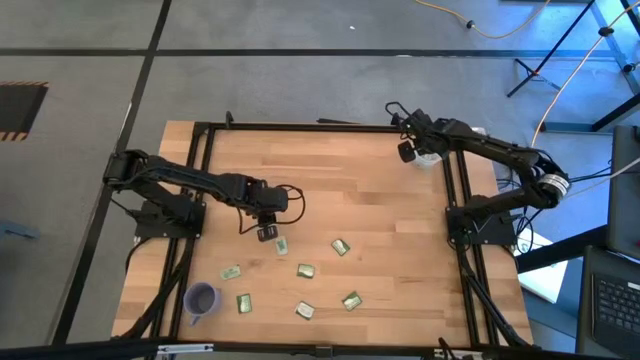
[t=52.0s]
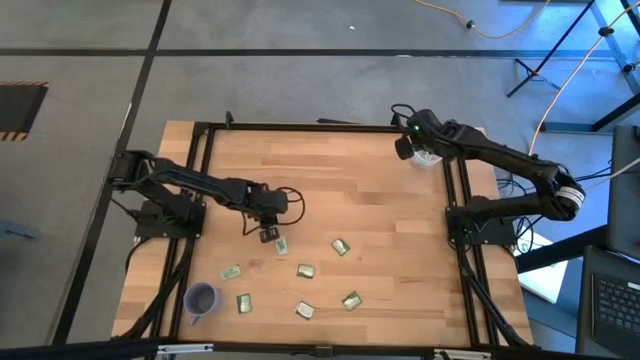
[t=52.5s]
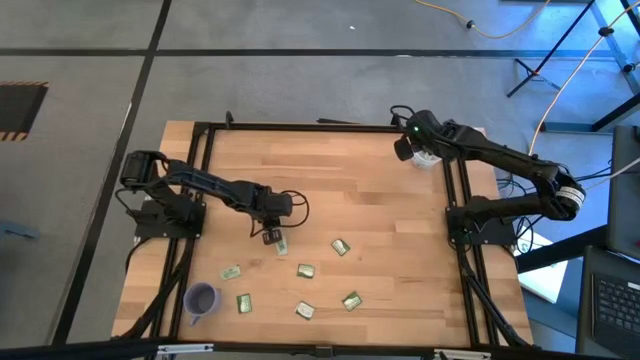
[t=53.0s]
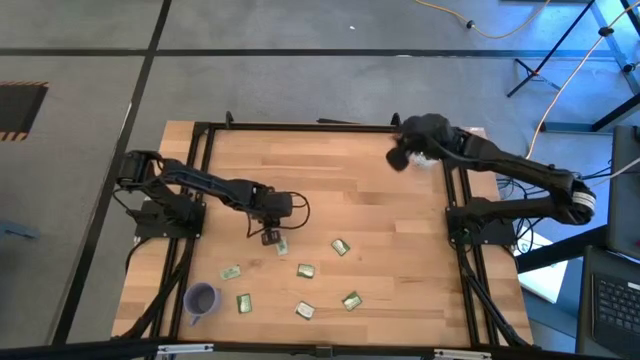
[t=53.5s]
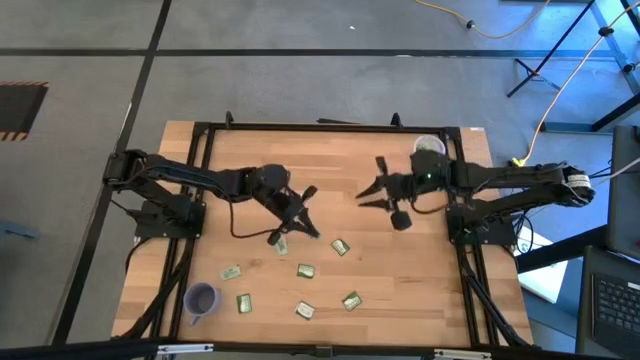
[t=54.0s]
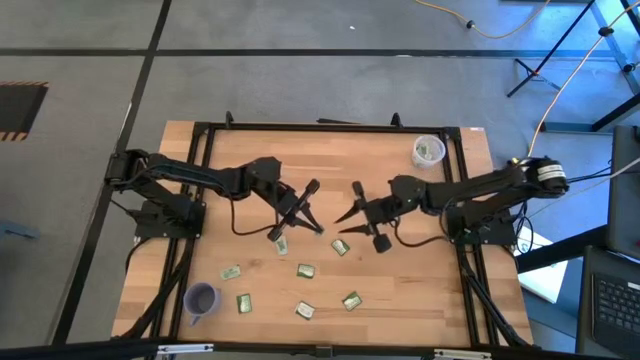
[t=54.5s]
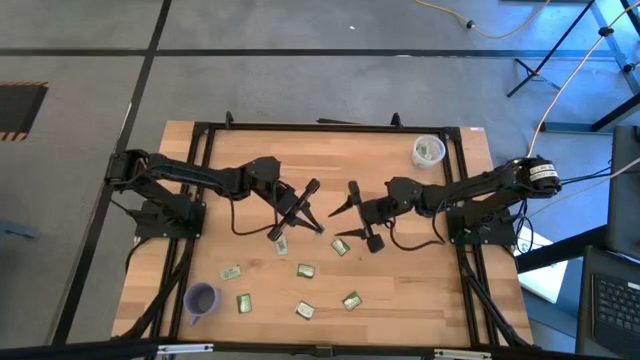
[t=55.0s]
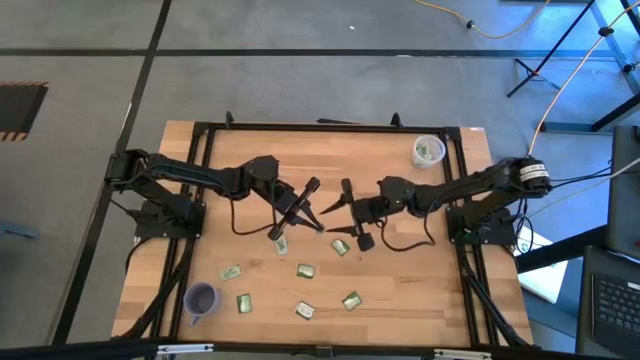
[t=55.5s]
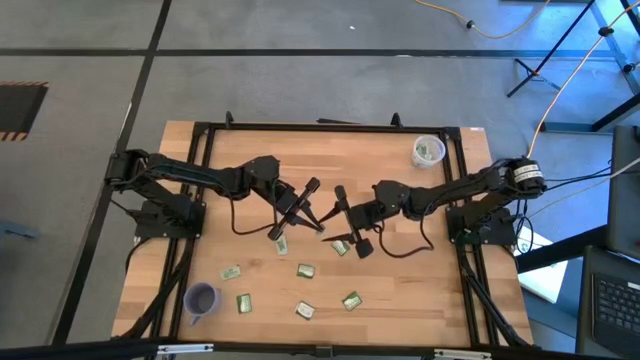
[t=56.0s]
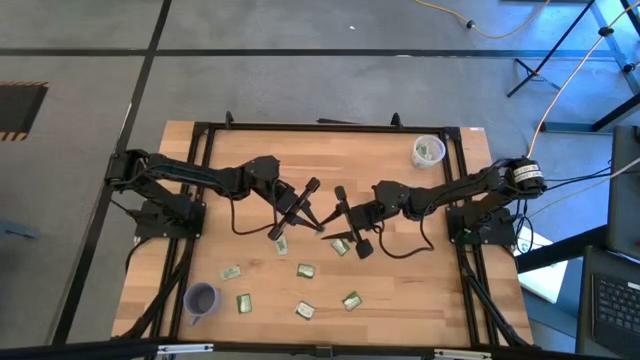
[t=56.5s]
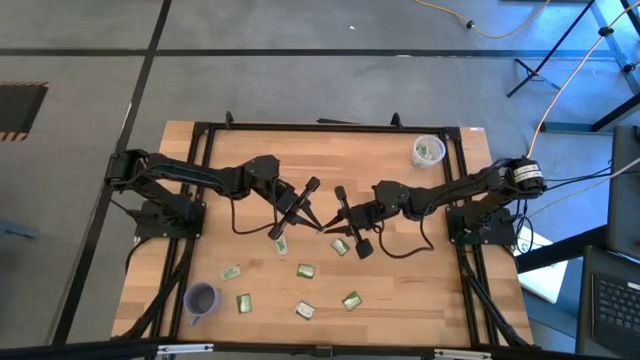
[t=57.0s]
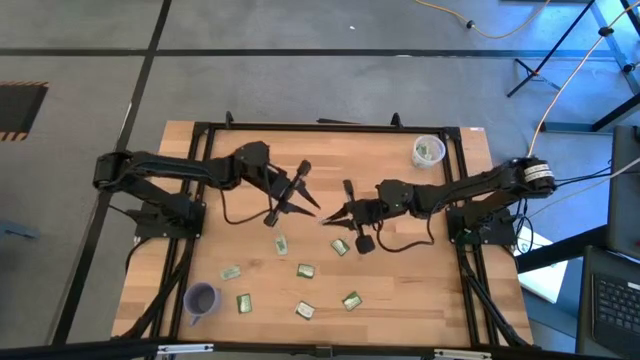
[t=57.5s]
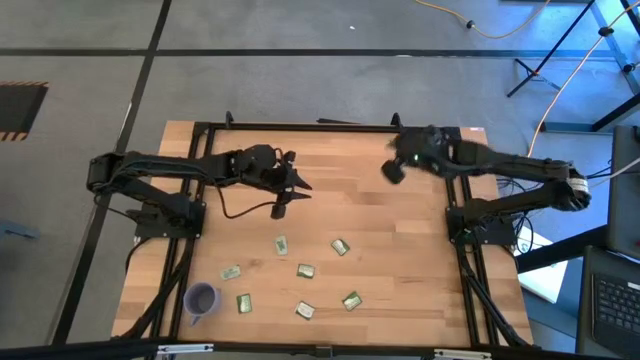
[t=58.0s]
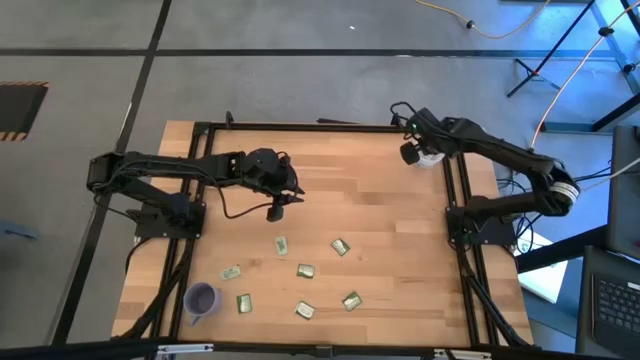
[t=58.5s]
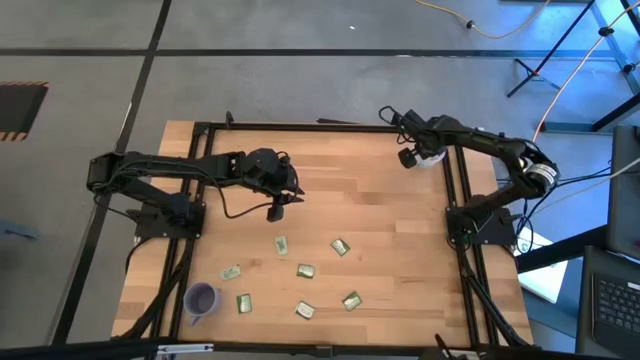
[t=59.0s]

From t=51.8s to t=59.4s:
Task: Pick and place Stevia / Truvia into bins
Put the top right light green stevia packet into the transparent container

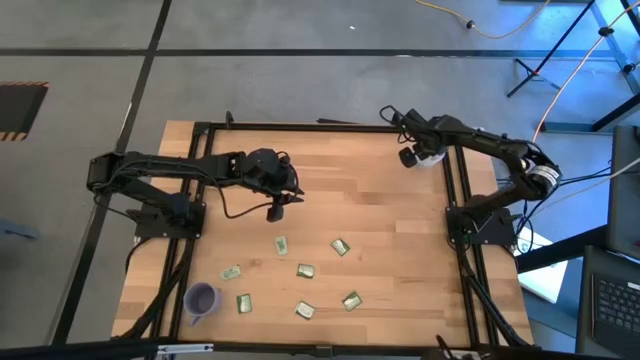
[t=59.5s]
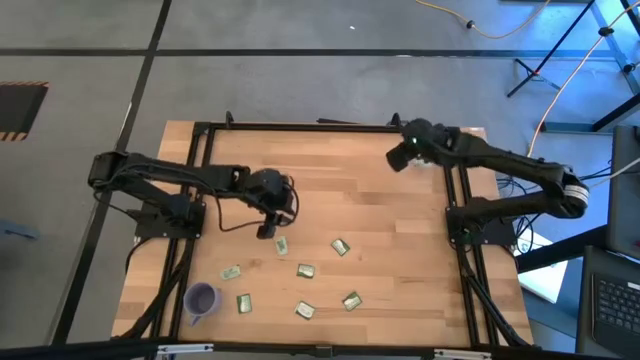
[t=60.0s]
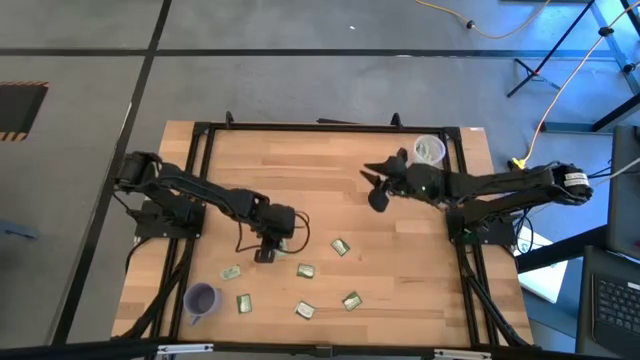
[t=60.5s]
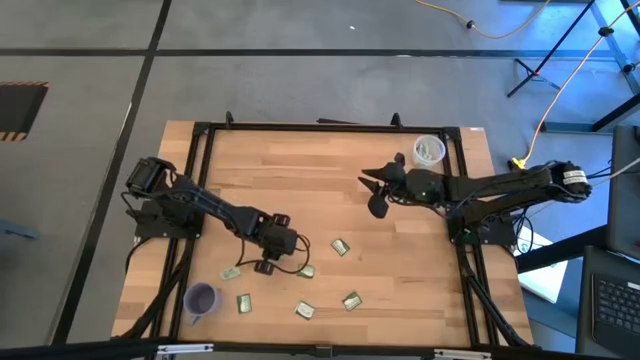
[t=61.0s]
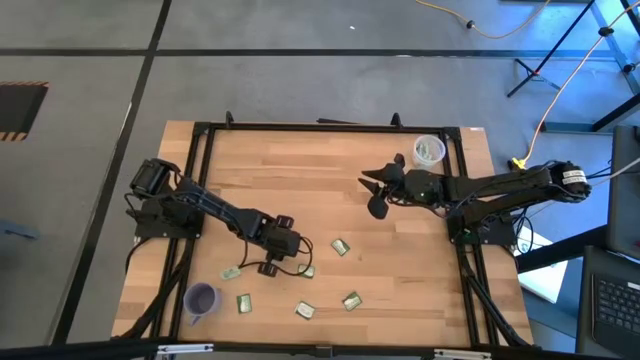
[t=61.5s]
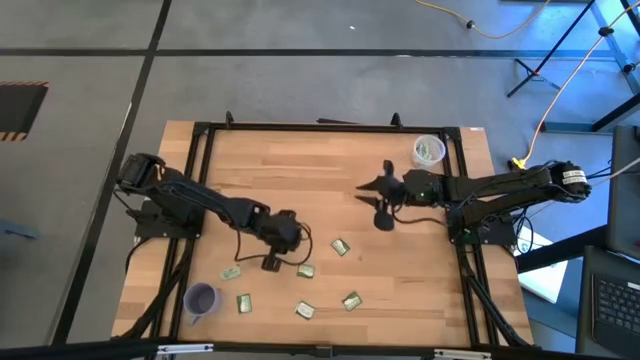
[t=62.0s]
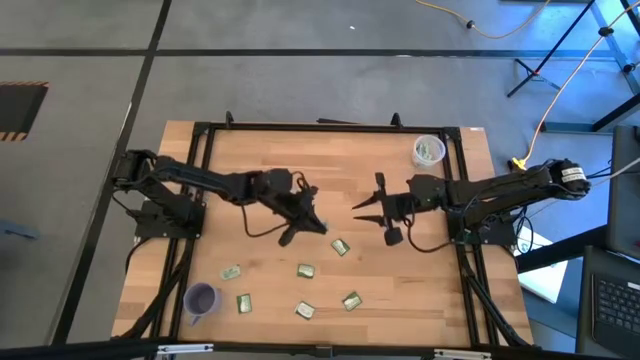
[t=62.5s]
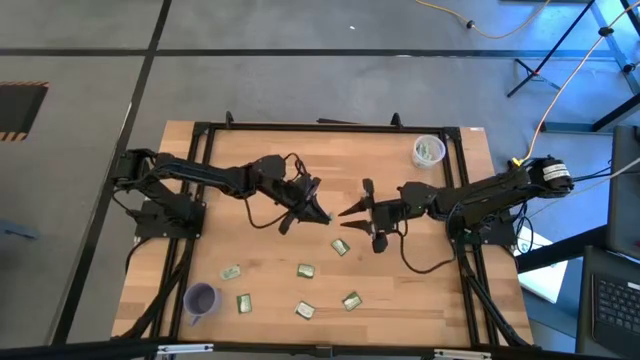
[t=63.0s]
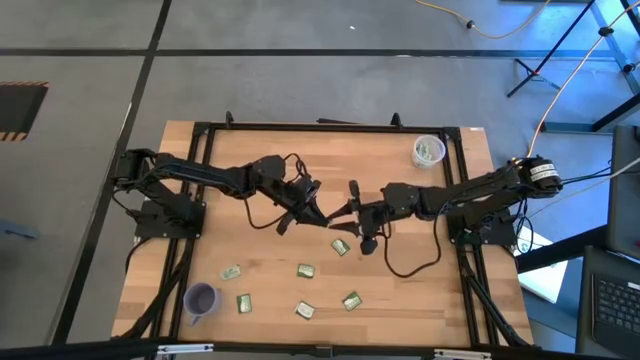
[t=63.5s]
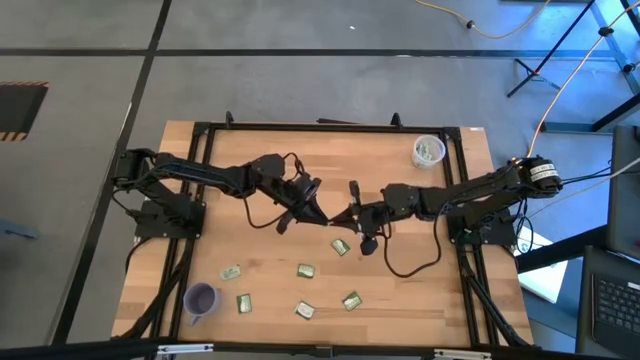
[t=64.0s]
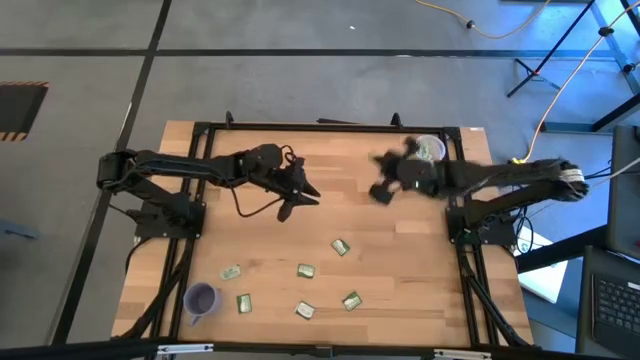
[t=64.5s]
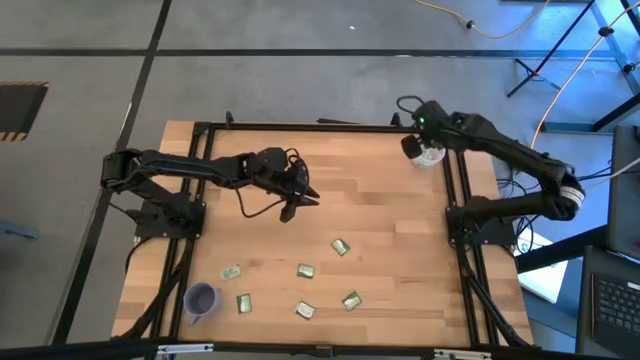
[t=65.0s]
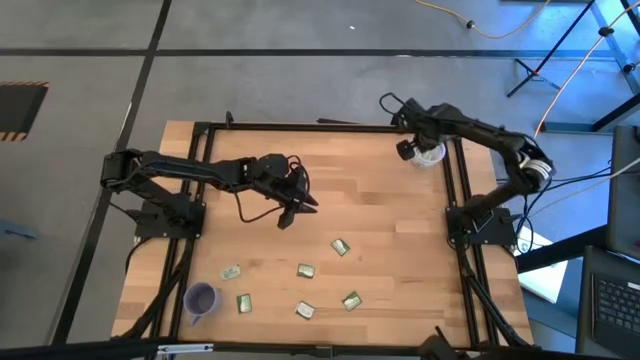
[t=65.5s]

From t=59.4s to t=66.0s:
Put the right light green stevia packet into the transparent container

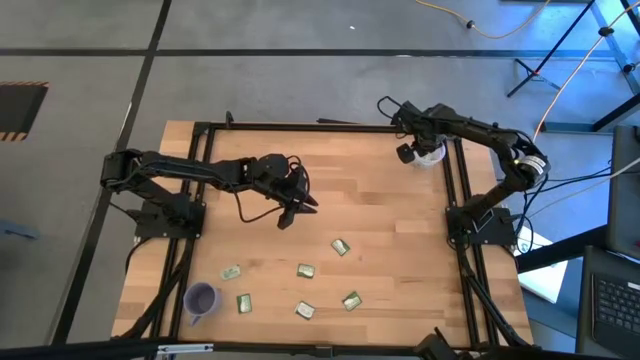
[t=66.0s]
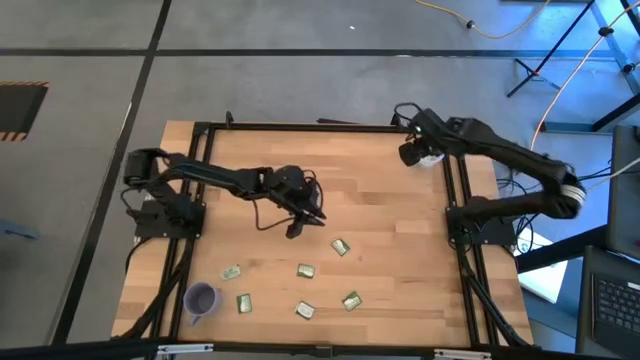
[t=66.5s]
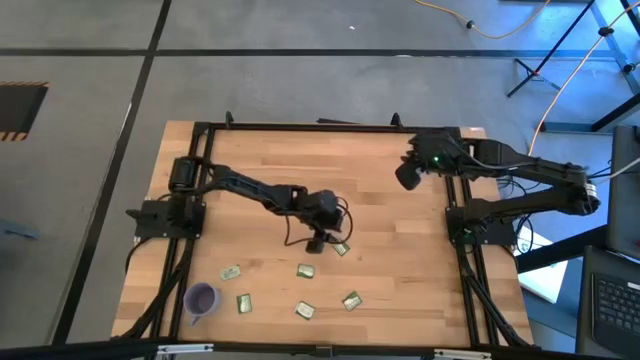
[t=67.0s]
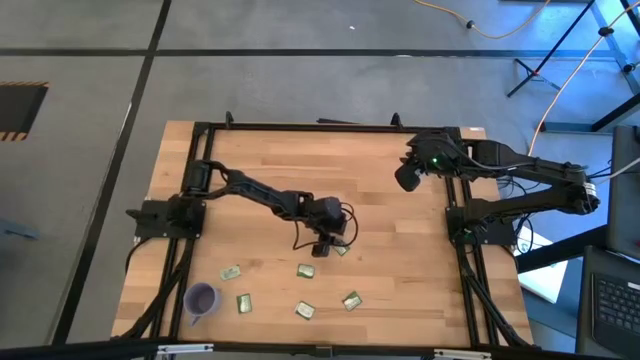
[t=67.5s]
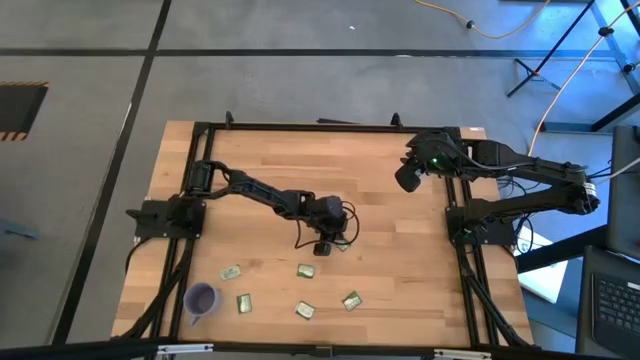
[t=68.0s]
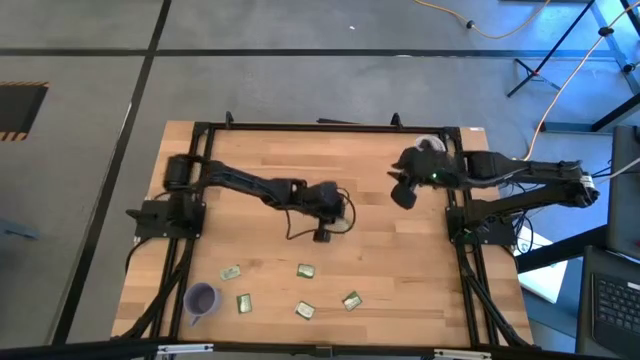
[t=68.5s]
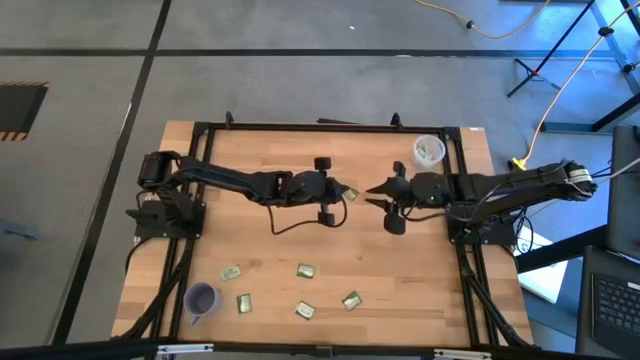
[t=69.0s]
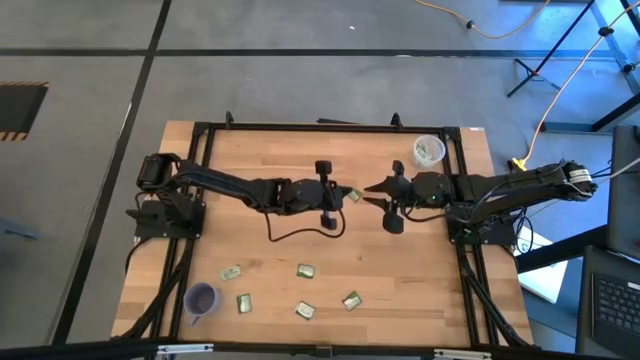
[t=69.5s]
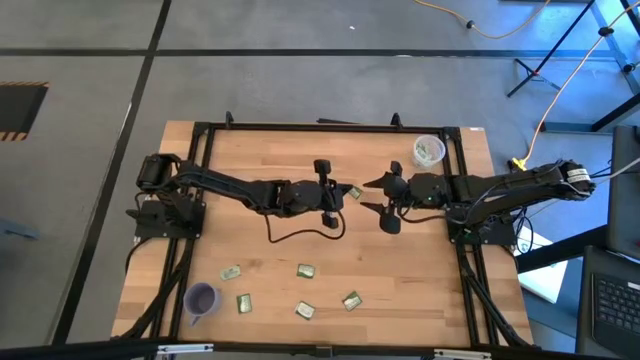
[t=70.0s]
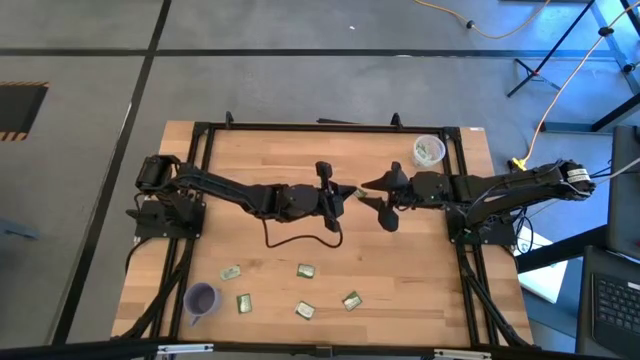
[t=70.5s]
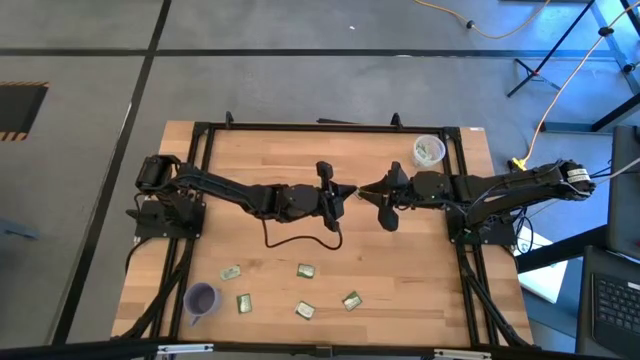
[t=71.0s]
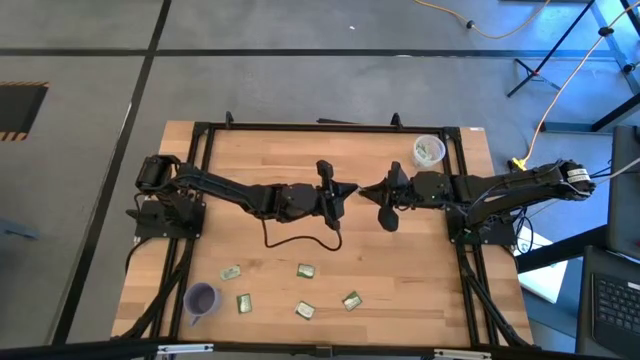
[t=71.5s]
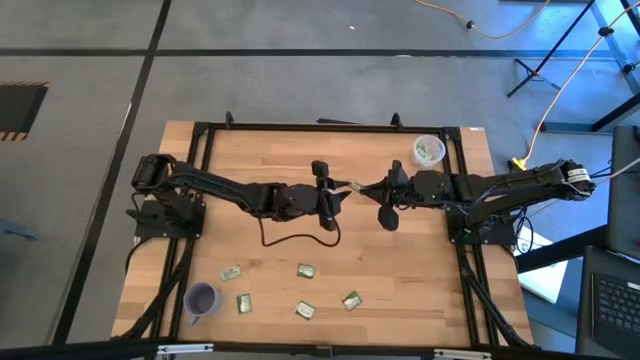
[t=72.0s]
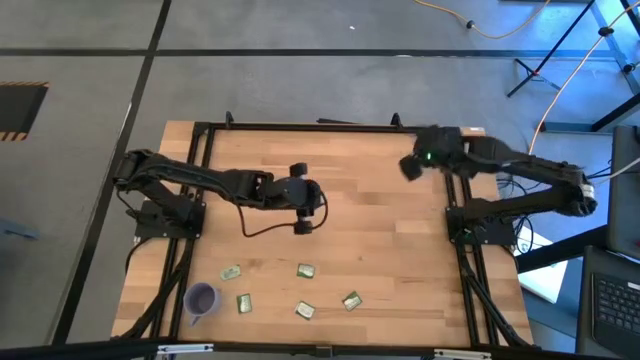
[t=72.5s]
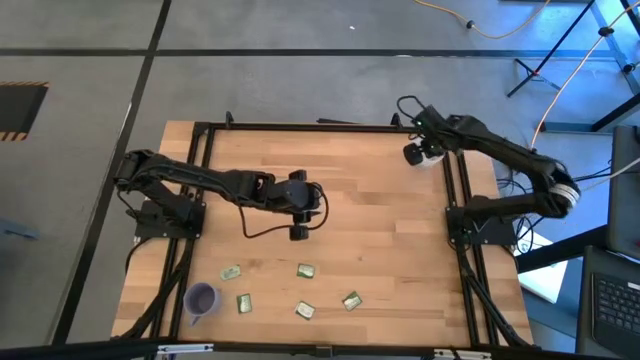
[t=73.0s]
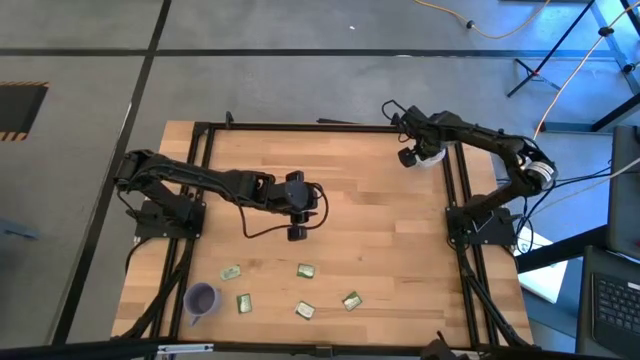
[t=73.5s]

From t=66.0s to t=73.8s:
Put the green stevia packet into the transparent container
